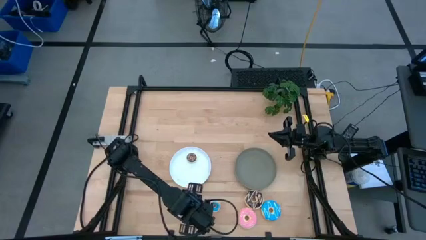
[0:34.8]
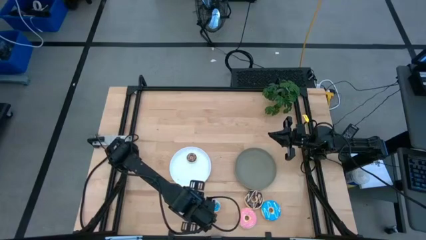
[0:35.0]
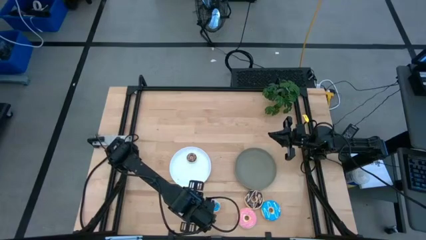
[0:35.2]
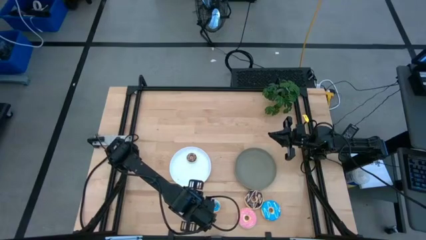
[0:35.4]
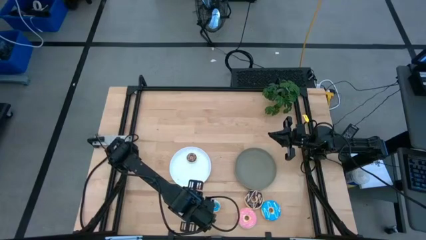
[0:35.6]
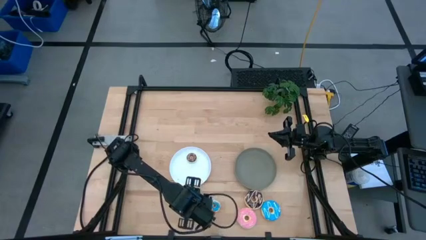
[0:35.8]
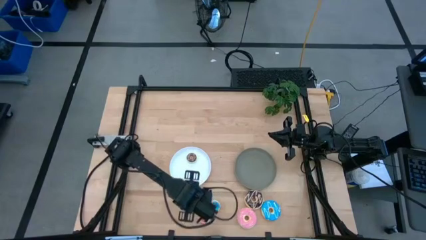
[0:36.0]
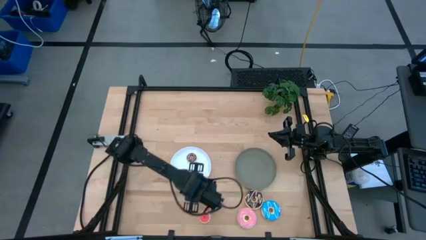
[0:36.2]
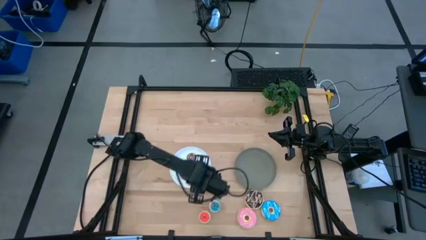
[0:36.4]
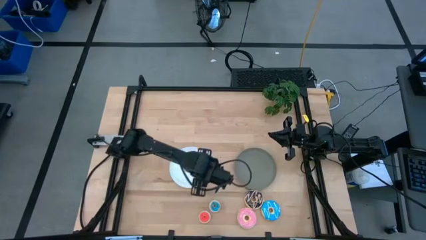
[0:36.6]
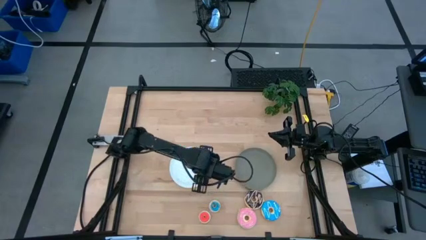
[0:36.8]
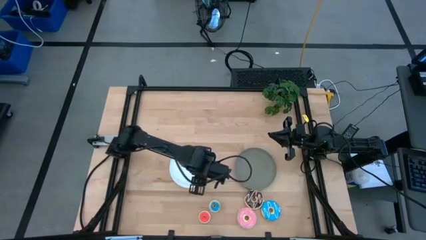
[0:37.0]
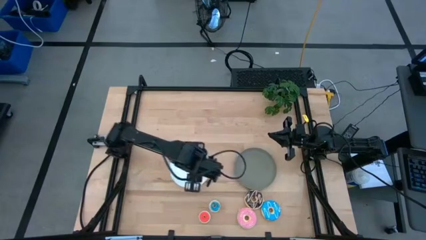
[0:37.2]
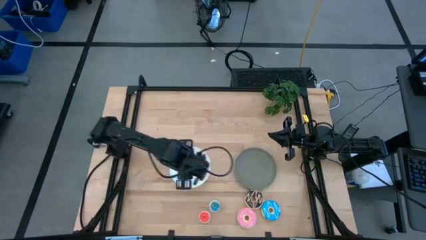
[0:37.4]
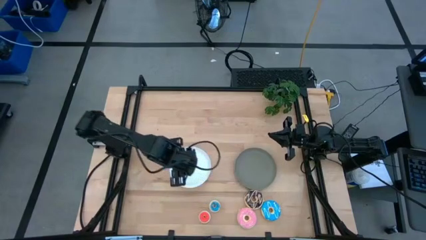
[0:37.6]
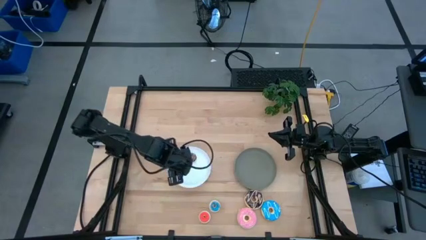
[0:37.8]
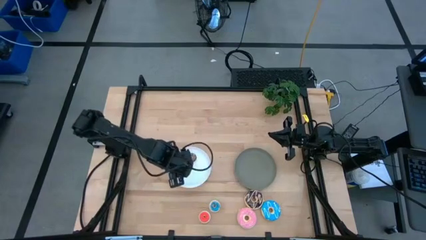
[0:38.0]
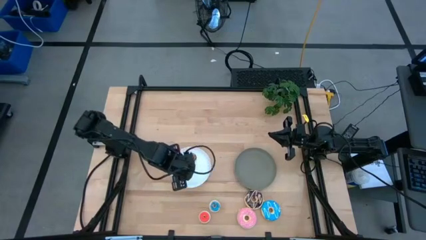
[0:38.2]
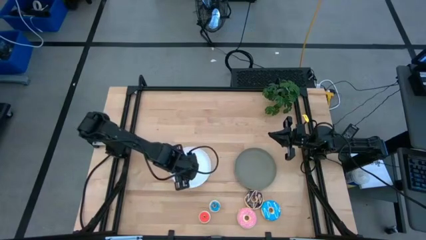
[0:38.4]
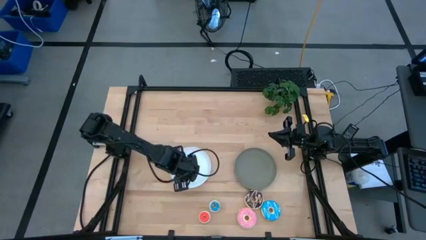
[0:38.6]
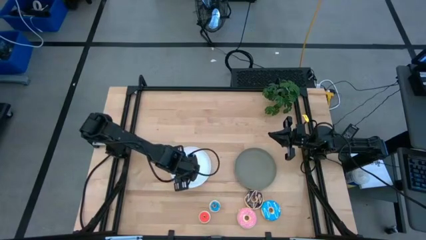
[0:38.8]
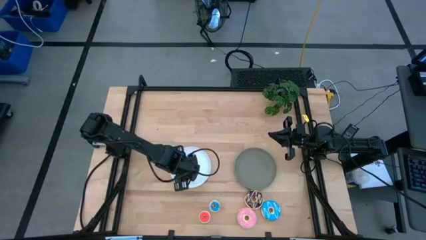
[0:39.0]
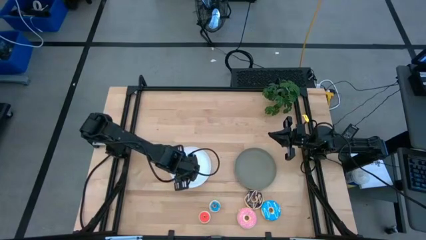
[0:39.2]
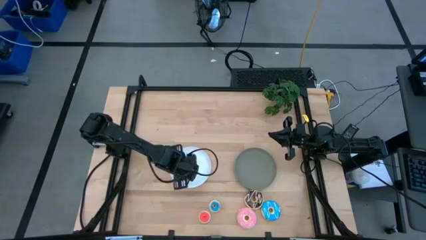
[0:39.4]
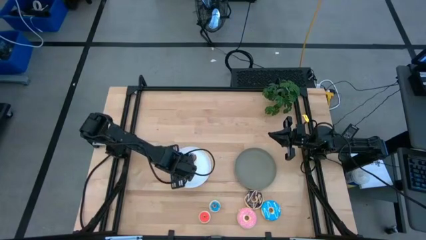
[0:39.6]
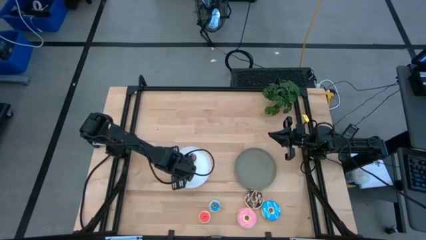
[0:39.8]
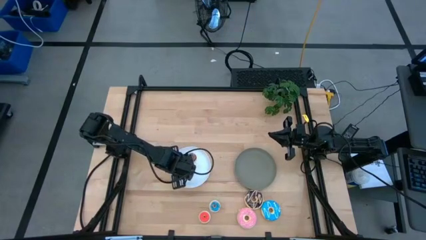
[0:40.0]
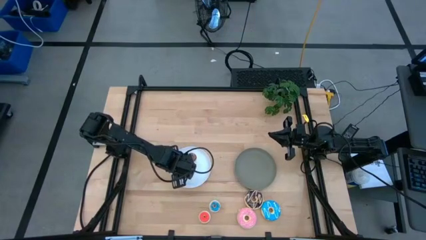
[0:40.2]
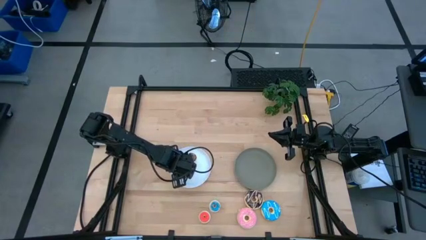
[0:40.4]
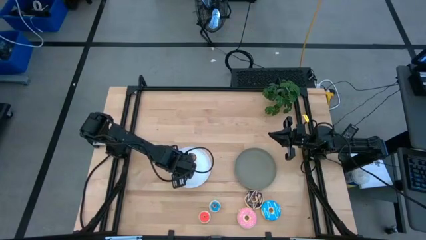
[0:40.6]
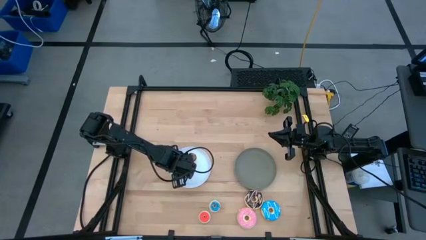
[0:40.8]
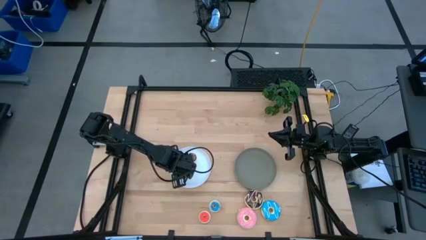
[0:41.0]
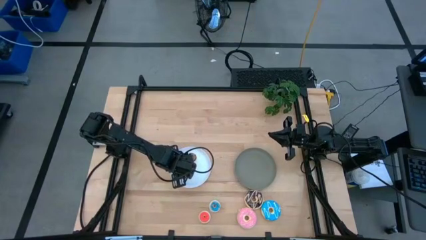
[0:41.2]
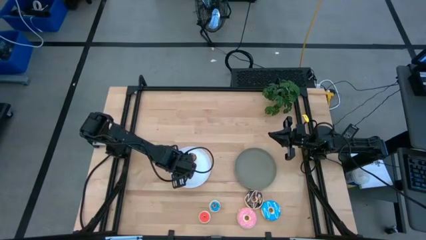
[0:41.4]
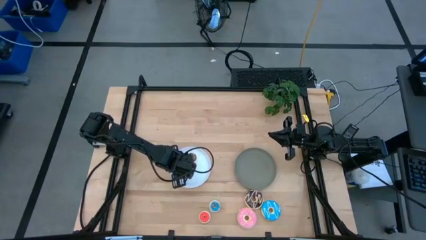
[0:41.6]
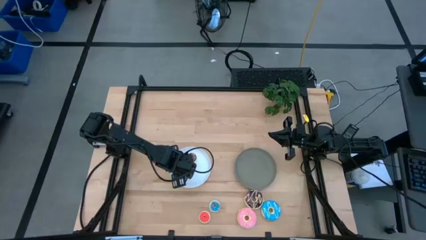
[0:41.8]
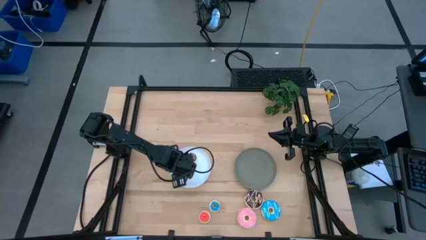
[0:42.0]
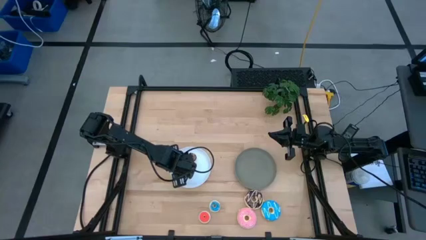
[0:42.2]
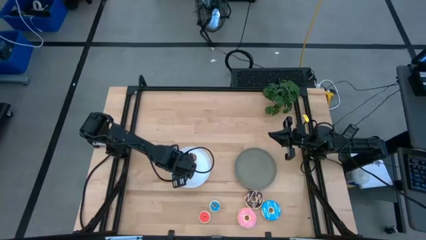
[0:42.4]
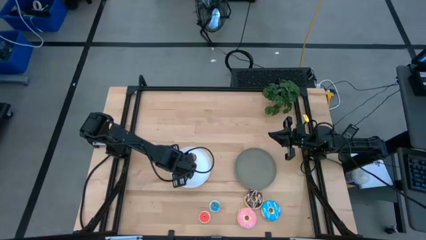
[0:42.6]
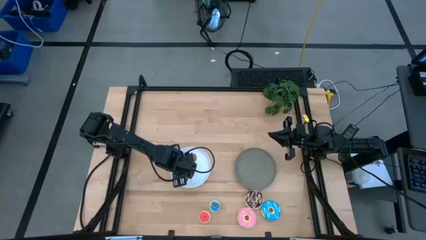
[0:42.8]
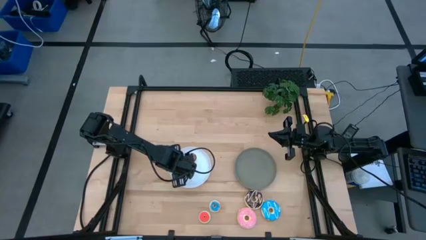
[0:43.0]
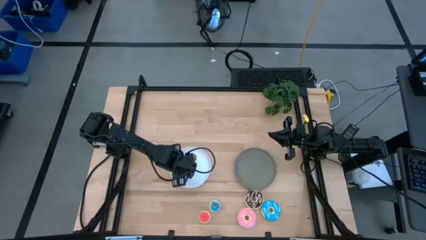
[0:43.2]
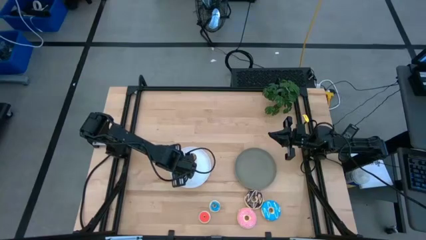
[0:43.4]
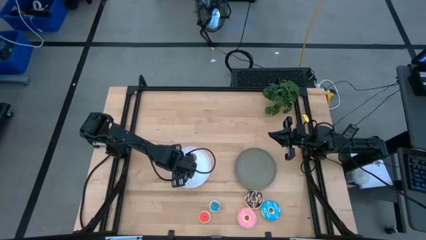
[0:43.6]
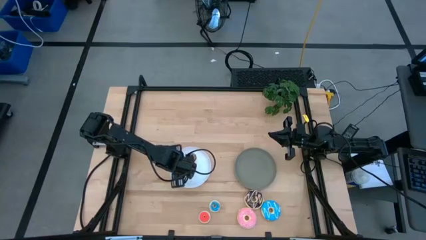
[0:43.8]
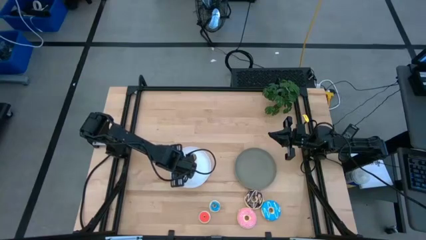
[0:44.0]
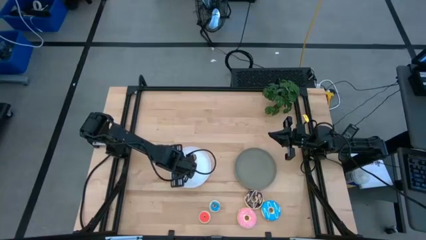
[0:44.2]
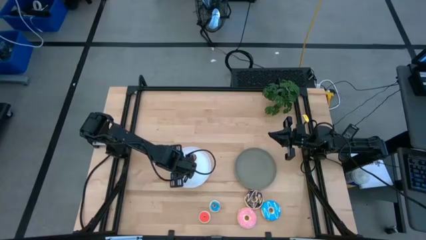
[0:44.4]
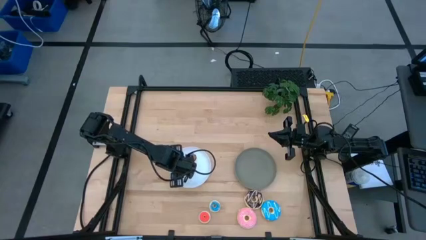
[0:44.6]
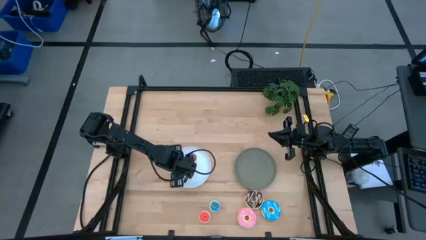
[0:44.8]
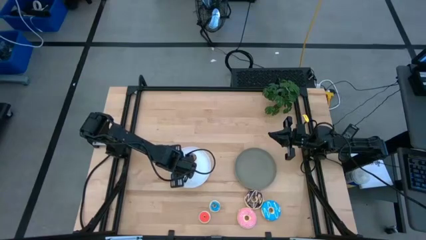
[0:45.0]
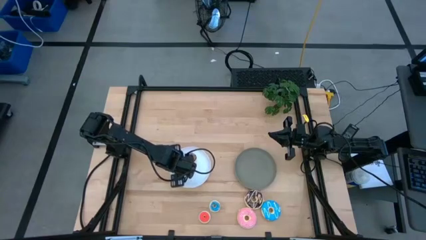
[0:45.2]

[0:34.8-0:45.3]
Task: Pick & Place donuts
Put the small white donut on the white plate

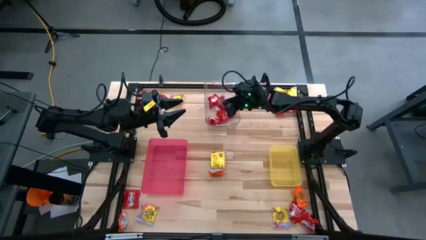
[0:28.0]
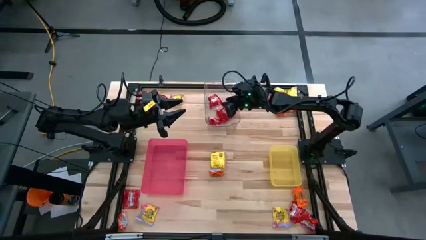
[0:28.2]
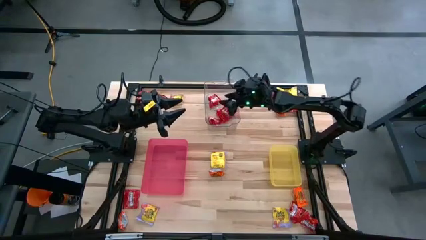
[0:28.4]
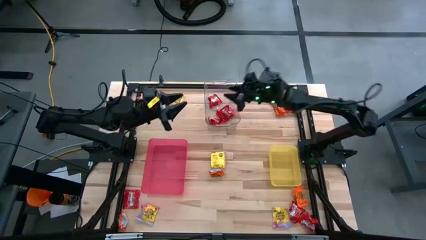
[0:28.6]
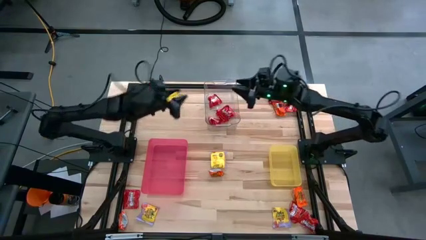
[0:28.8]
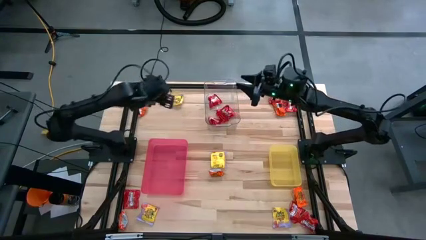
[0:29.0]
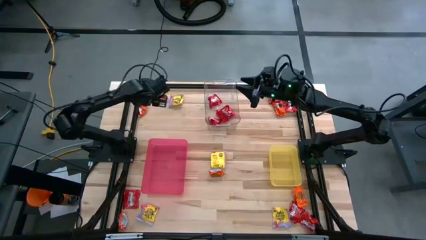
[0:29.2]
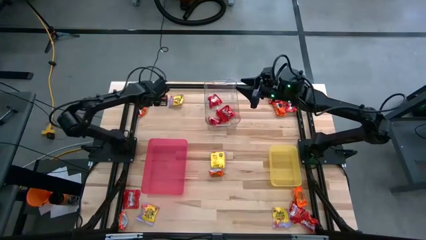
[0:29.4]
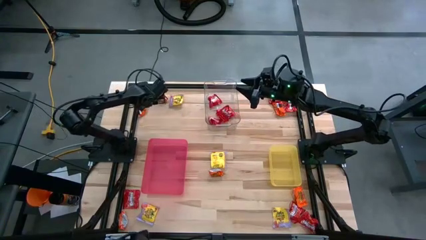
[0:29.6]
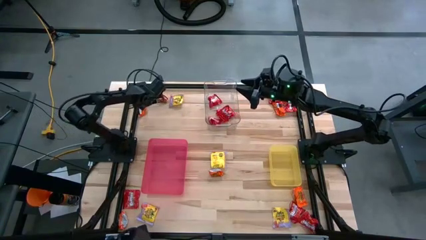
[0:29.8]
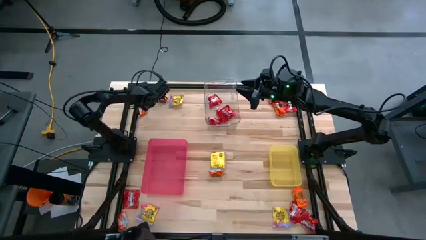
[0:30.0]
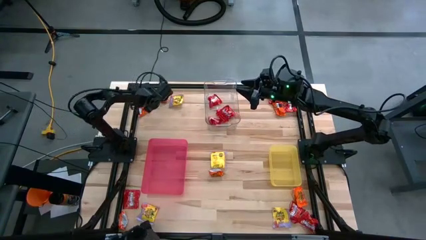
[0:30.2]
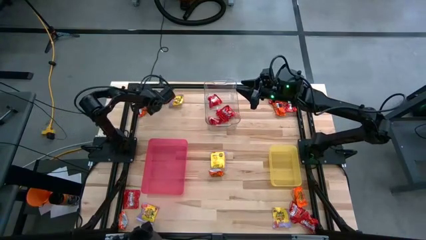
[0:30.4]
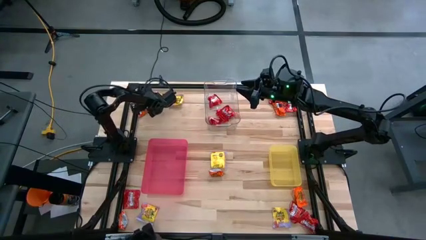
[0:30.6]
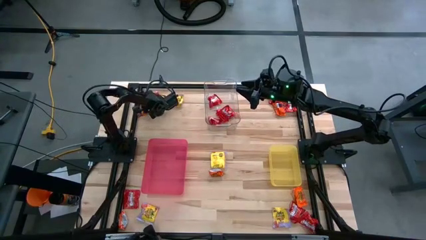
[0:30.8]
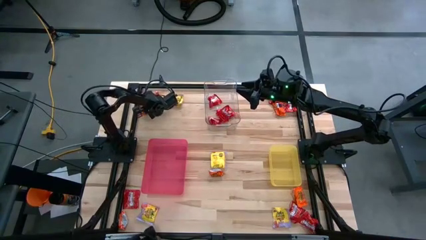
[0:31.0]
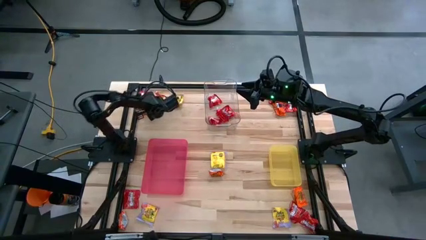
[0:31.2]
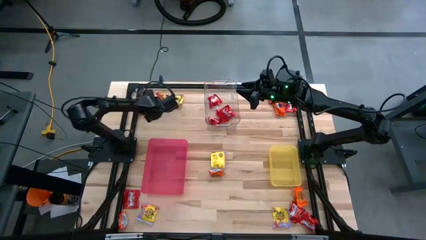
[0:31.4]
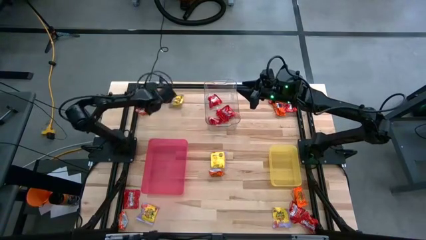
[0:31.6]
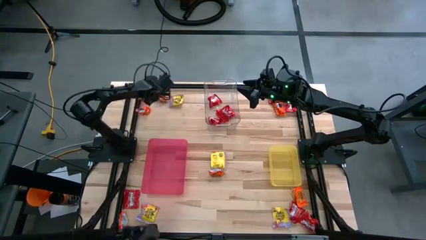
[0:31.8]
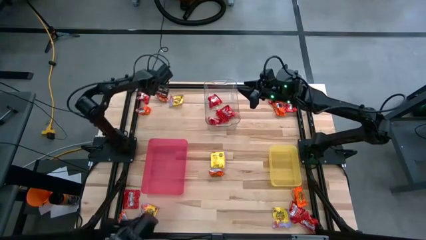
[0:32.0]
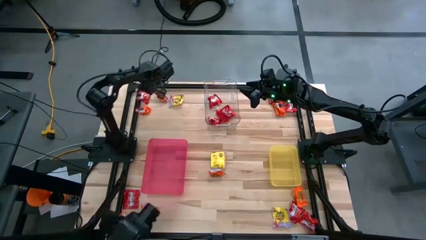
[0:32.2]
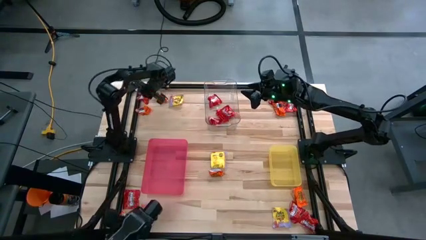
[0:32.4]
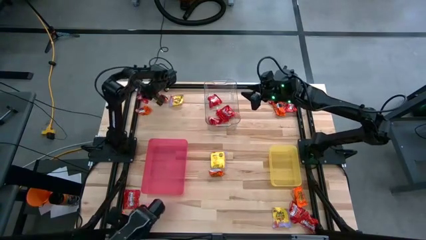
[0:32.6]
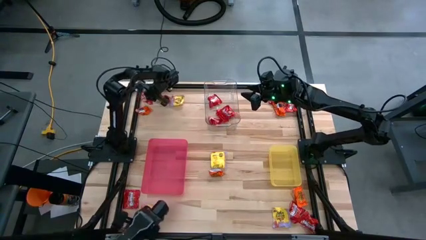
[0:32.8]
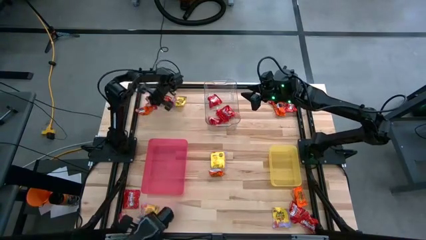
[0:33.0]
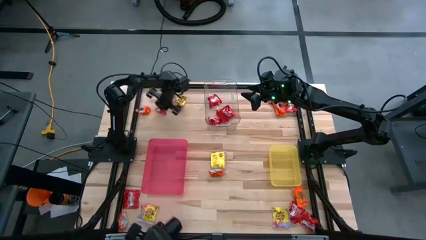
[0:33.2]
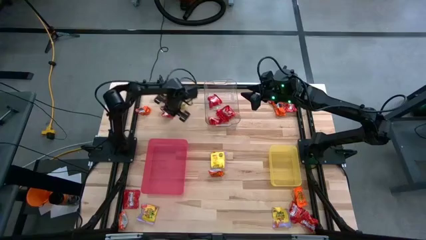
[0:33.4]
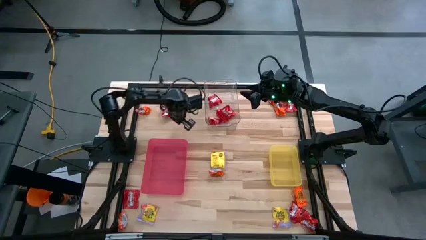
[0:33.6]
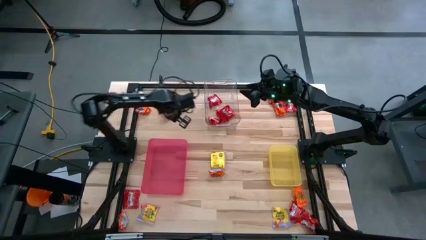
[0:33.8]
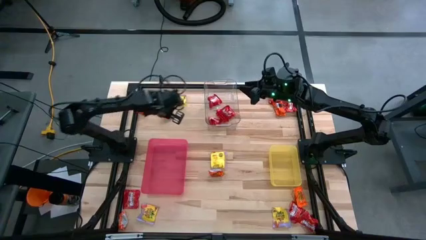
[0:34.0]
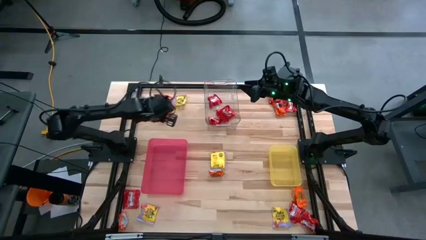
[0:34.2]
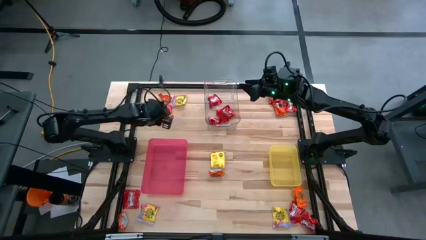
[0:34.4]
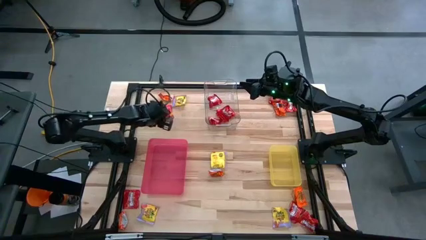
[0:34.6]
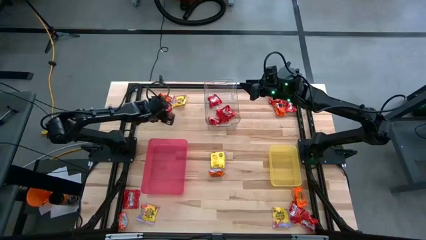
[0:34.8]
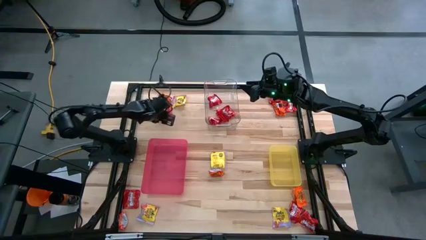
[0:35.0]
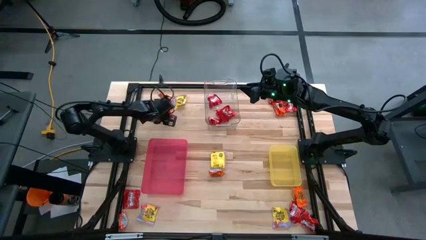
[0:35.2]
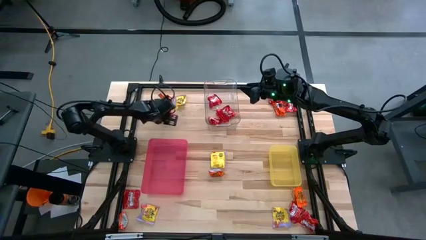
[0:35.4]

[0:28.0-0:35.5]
Task: Sort candy
Put the red candy into the transparent bin
